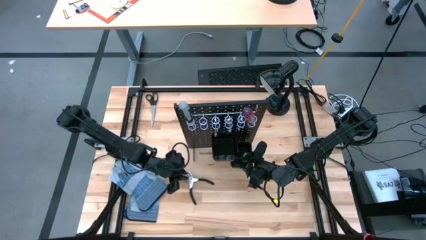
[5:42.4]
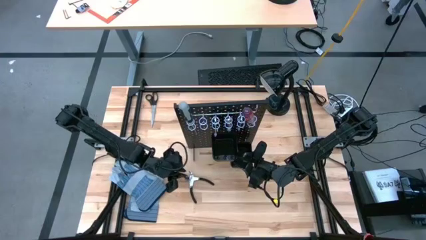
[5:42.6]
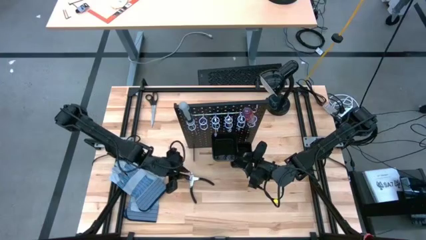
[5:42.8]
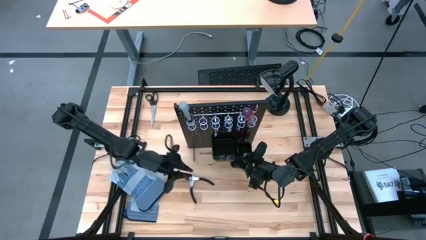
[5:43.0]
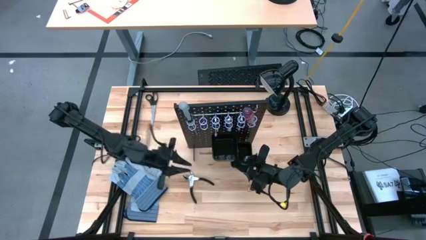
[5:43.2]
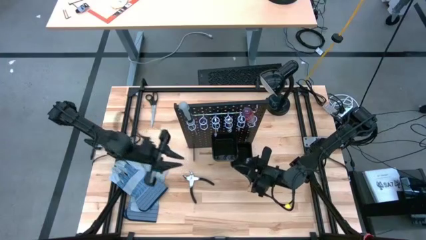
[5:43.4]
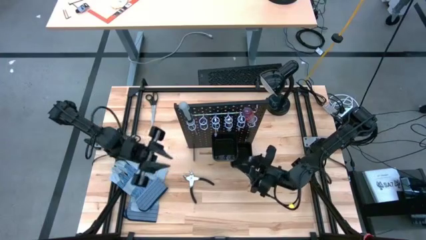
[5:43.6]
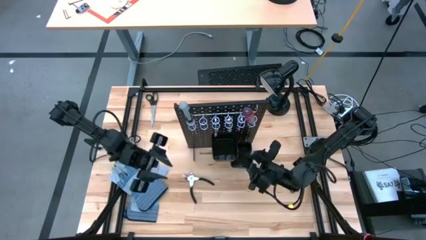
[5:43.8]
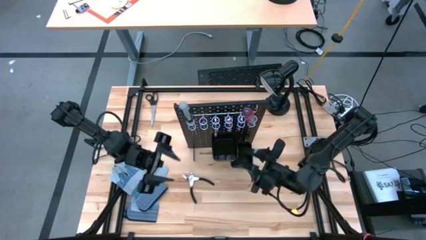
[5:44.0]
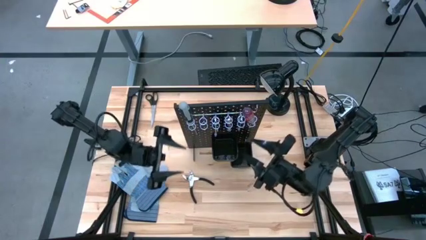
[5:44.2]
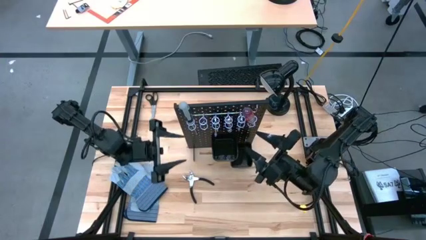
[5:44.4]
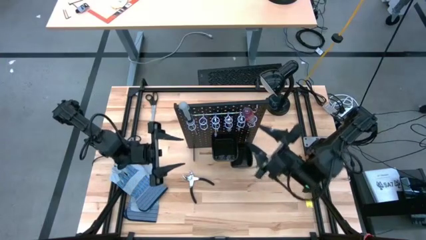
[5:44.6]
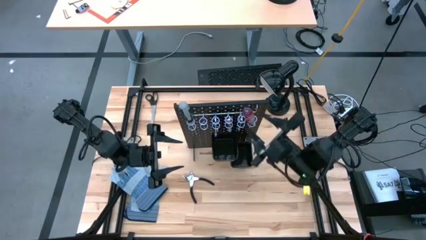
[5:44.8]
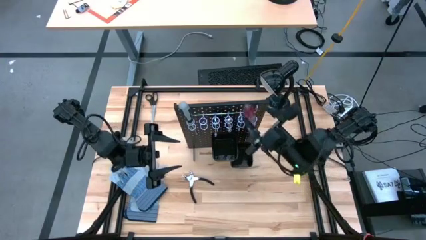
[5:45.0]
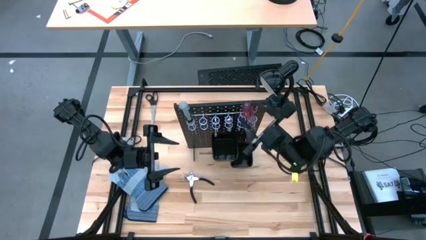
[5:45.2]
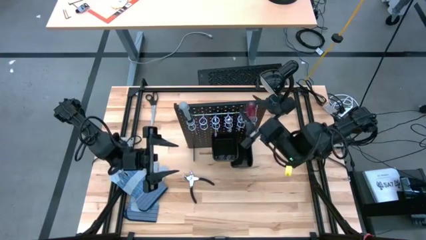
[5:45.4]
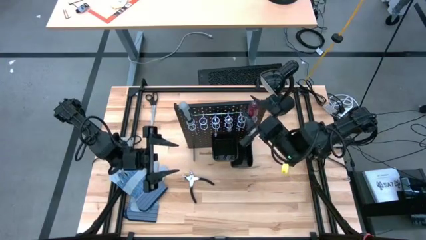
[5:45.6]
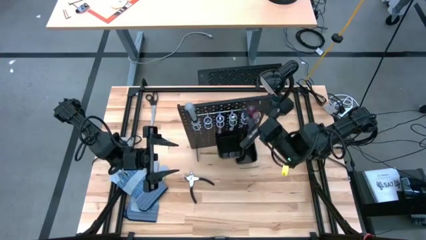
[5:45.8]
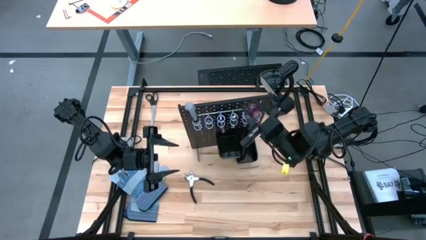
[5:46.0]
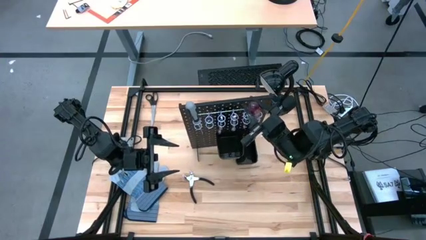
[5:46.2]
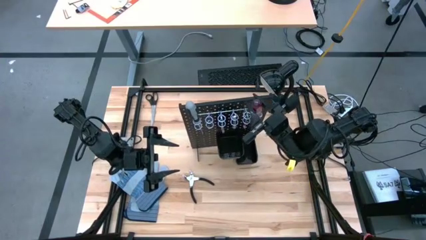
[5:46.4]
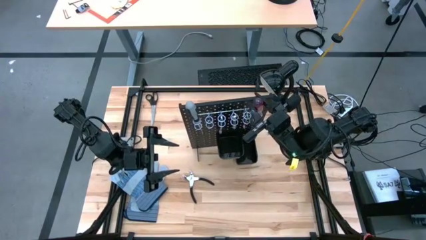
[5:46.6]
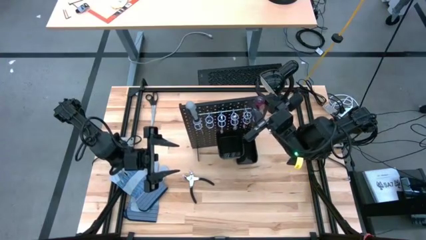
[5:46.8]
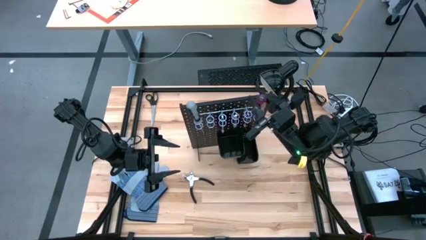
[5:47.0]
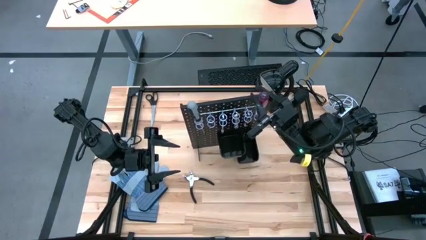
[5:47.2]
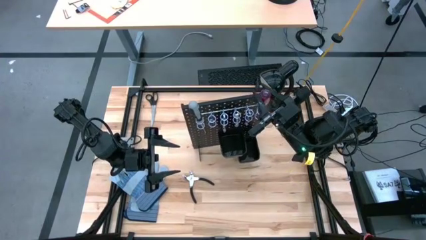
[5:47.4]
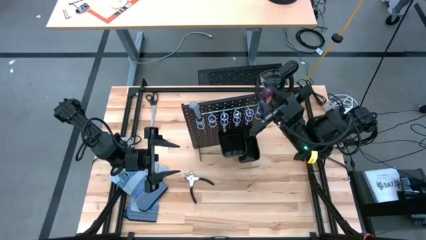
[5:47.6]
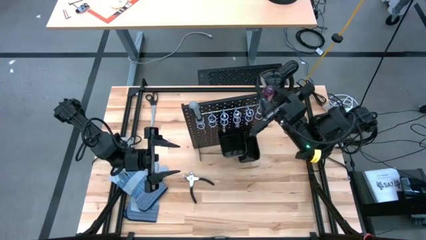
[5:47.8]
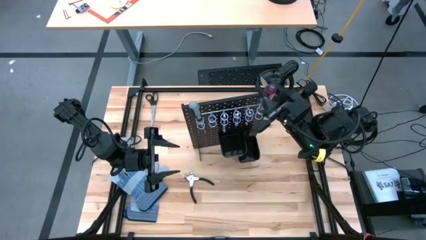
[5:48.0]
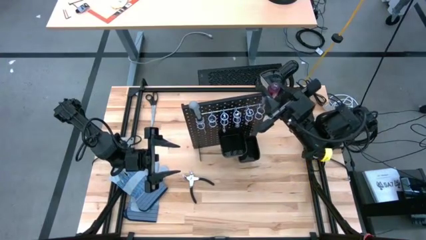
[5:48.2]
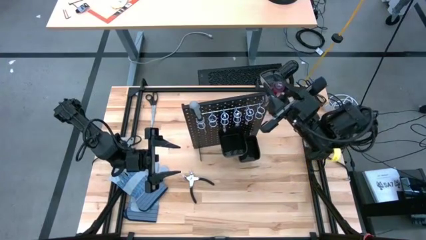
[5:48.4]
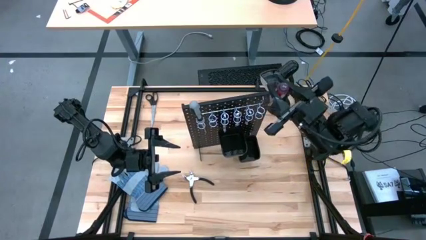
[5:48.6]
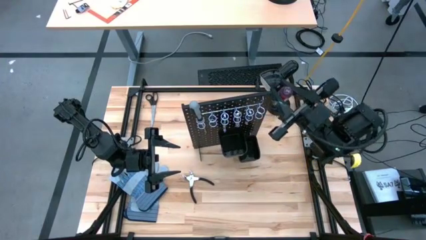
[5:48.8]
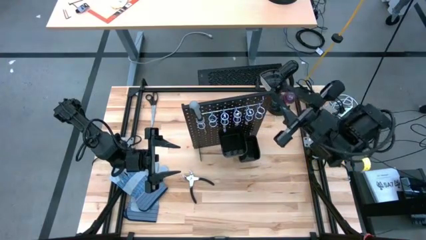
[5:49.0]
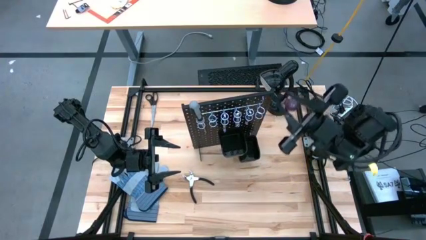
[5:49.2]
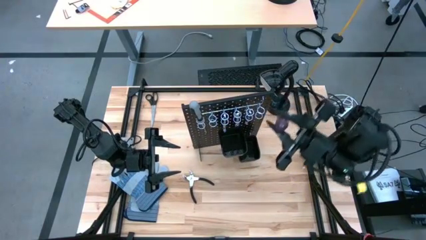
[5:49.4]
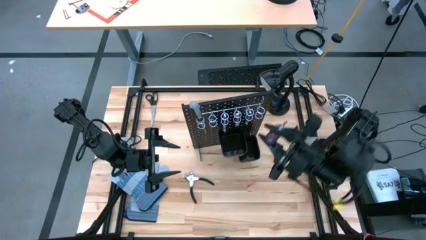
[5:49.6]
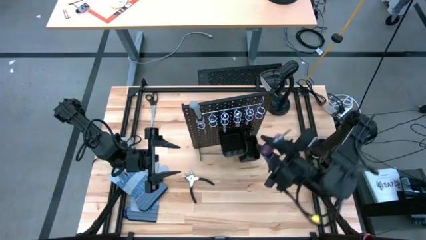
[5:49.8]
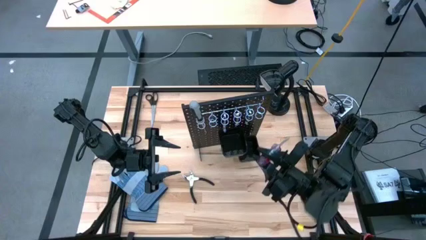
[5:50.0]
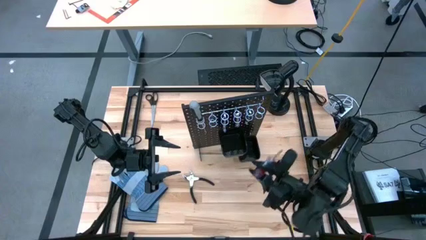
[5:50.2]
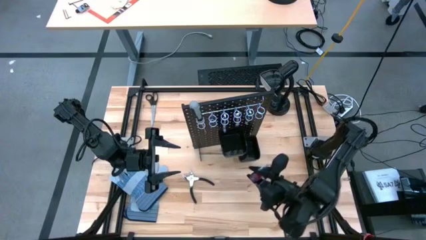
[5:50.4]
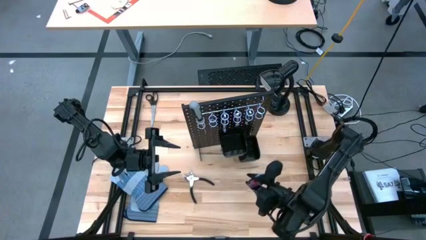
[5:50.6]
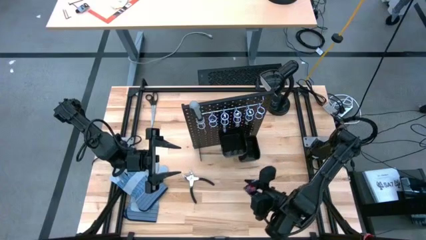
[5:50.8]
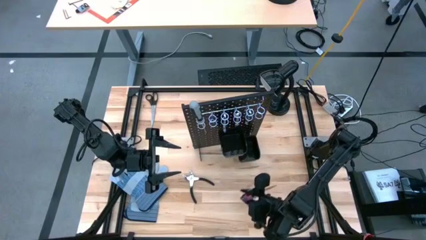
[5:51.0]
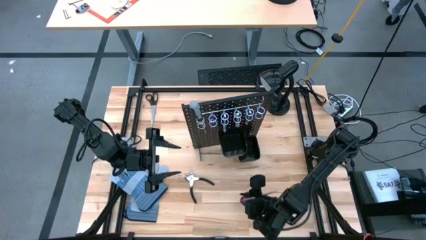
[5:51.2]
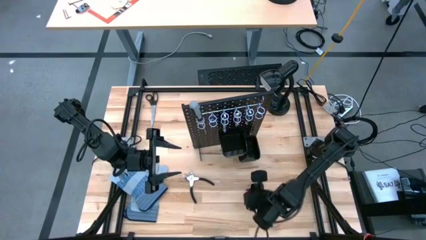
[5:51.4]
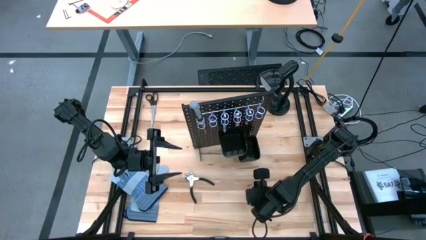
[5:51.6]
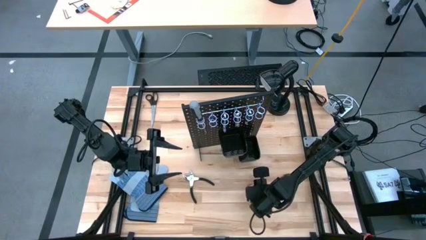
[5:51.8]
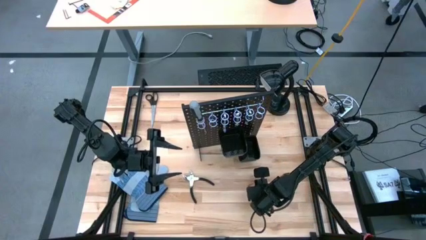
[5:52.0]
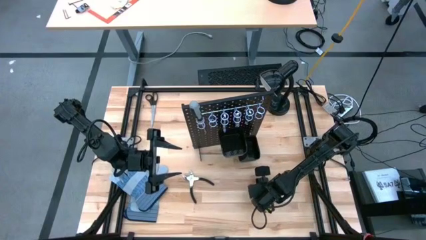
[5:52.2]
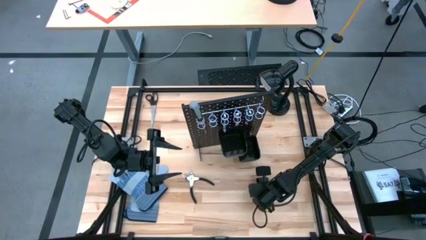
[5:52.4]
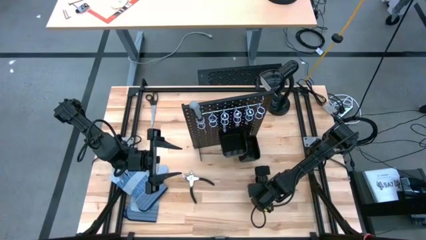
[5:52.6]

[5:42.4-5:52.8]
Task: Hang tools onto peg board
Unhang the red screwdriver from the black peg board

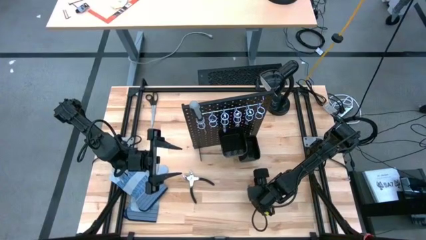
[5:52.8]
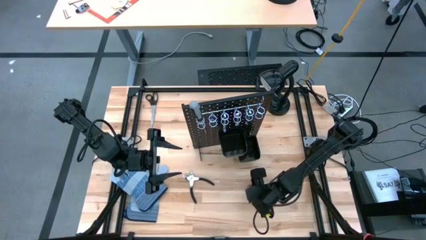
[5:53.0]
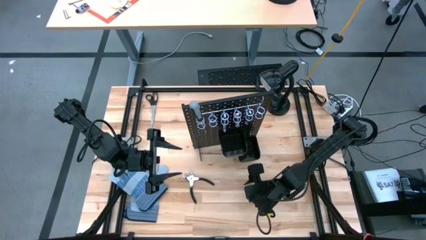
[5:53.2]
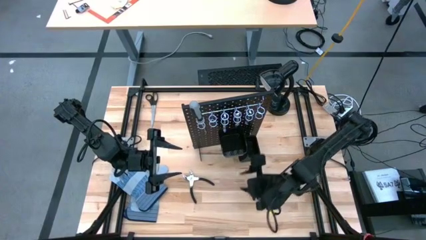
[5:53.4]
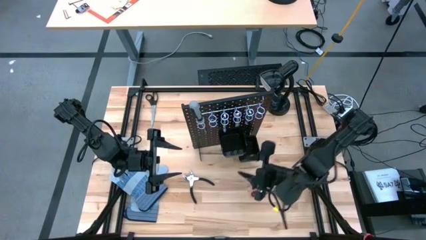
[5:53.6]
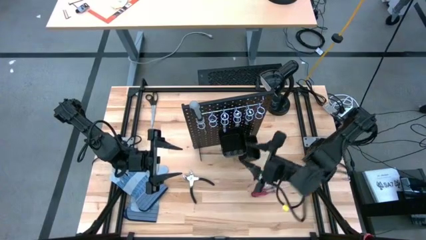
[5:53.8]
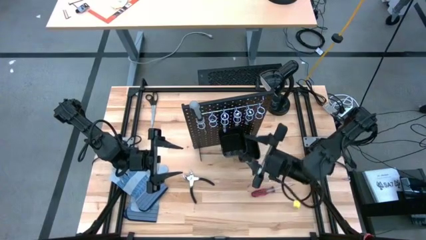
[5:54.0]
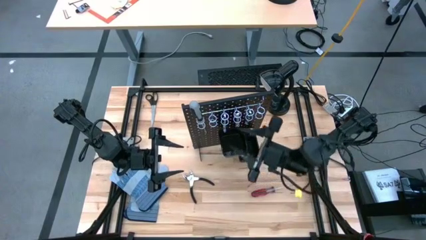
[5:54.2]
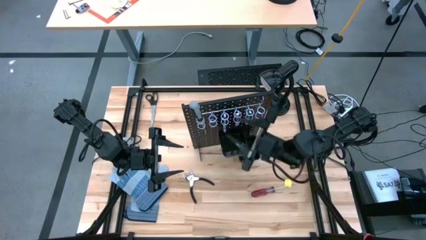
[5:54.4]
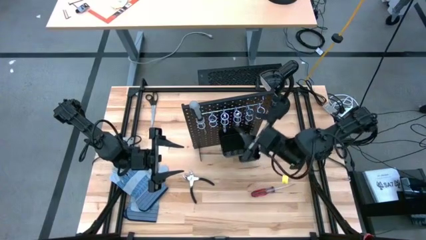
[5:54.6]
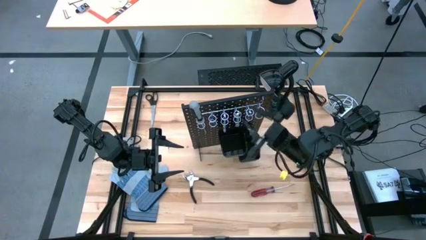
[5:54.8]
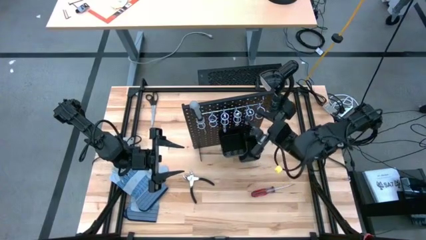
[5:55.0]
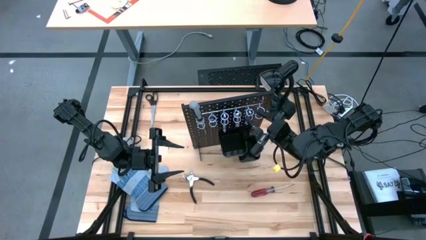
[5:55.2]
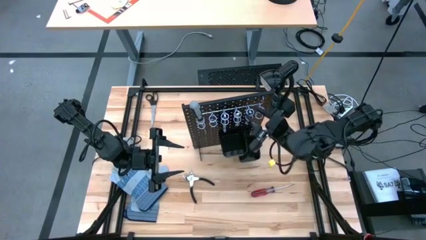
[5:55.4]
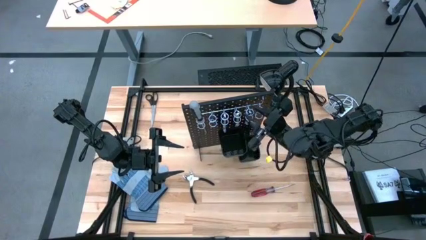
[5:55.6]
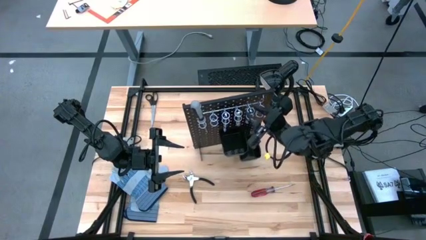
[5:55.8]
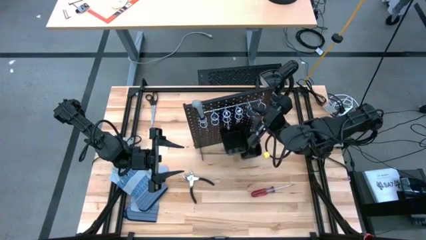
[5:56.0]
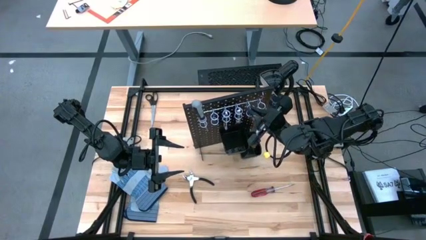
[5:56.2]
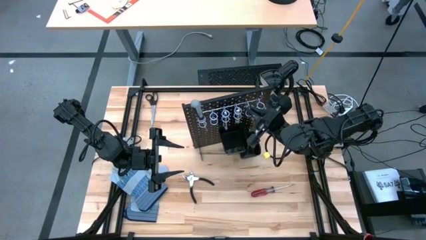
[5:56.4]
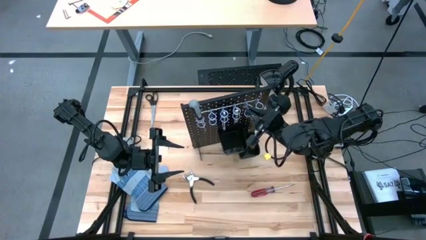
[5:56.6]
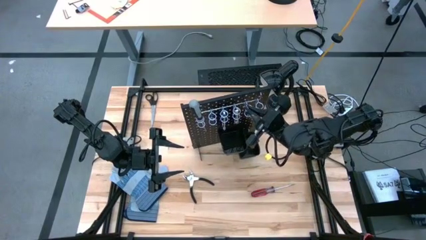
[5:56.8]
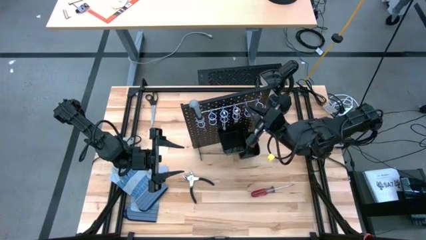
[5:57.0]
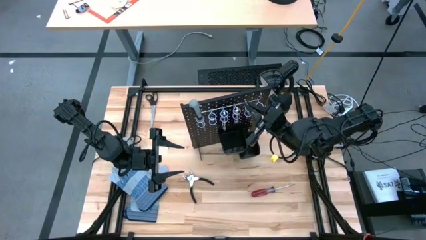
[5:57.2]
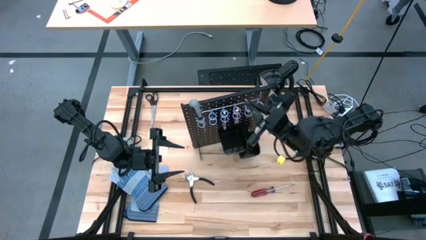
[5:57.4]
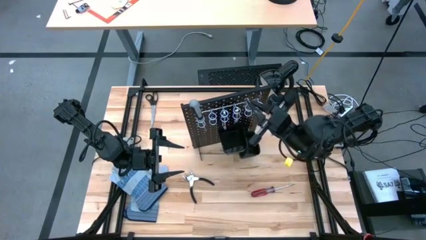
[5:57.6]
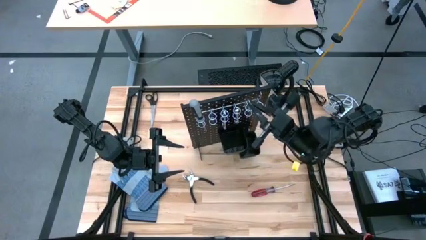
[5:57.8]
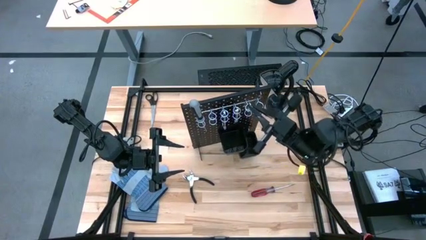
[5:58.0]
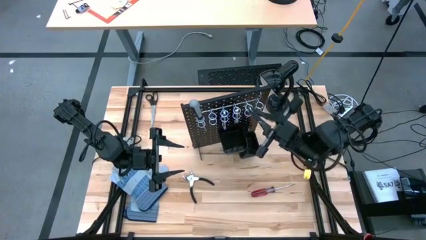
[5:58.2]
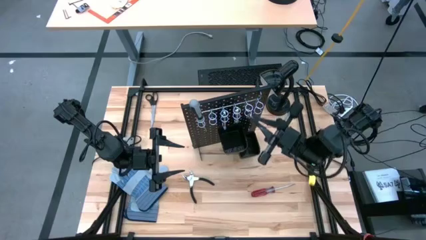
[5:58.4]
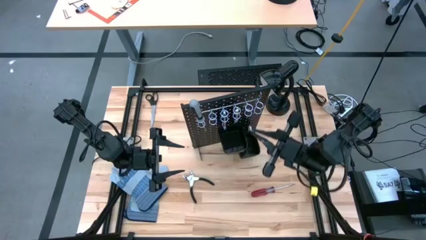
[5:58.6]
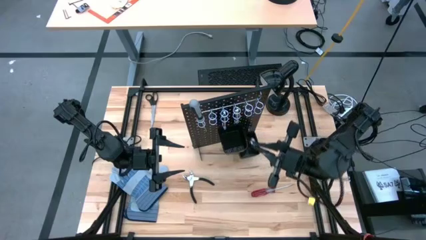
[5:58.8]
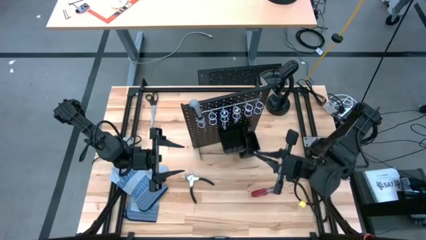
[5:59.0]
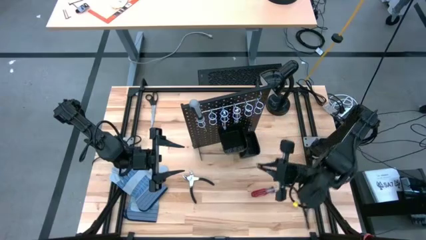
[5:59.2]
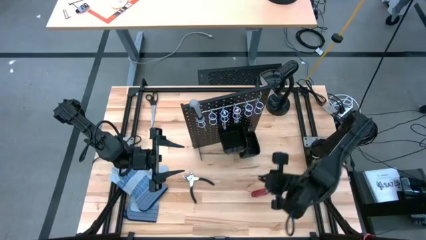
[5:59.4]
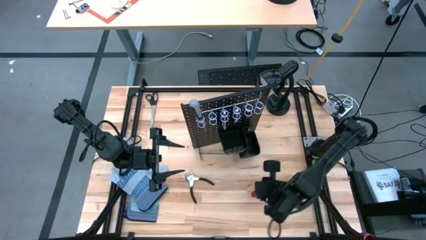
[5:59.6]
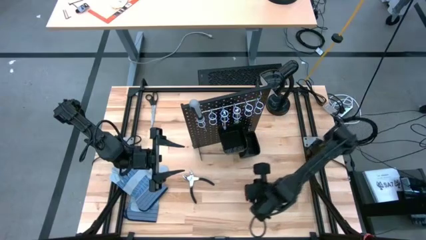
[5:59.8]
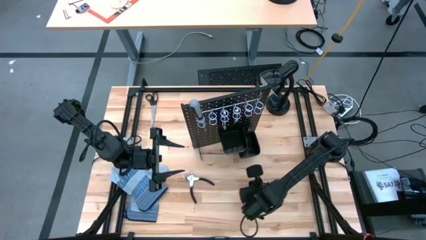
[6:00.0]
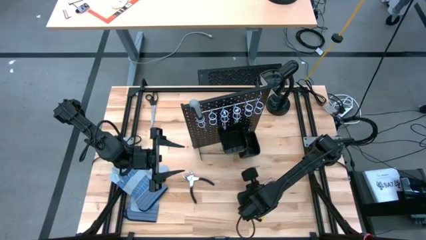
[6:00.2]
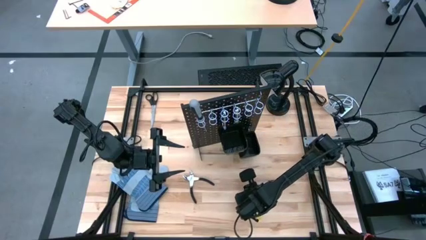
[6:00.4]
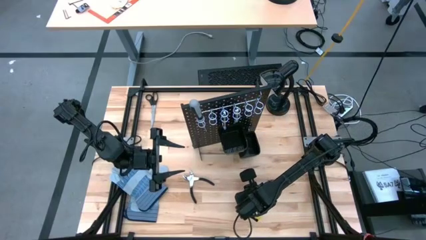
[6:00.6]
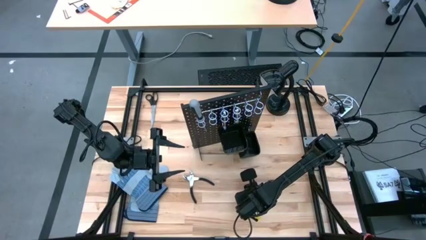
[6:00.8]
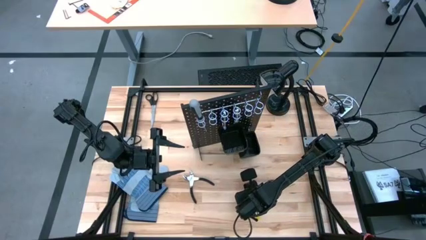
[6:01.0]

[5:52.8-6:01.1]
Unhang the silver wrench from the black peg board
